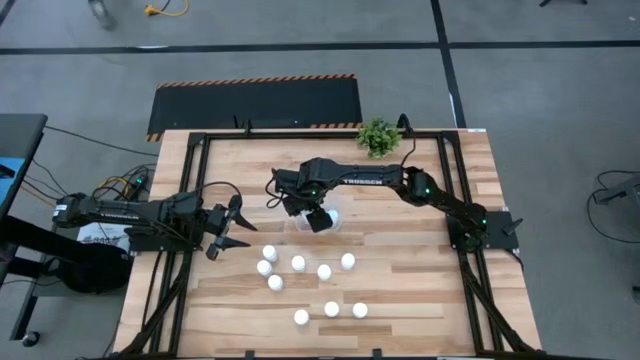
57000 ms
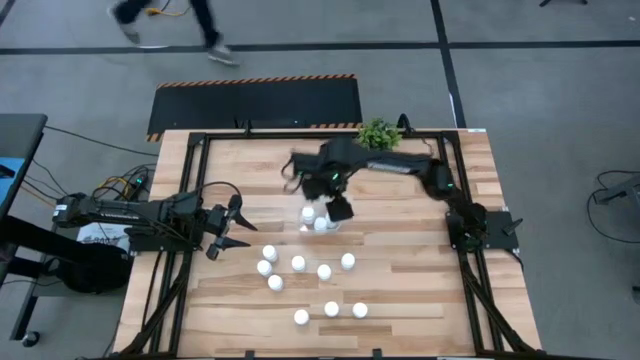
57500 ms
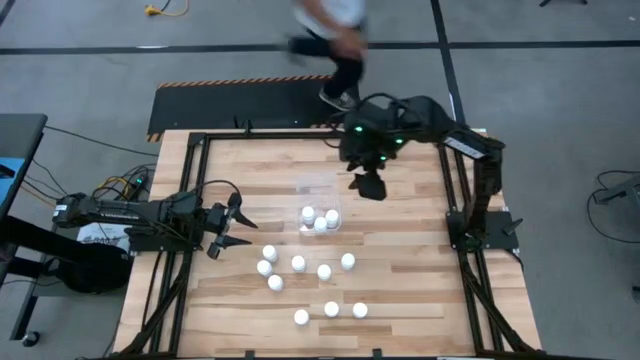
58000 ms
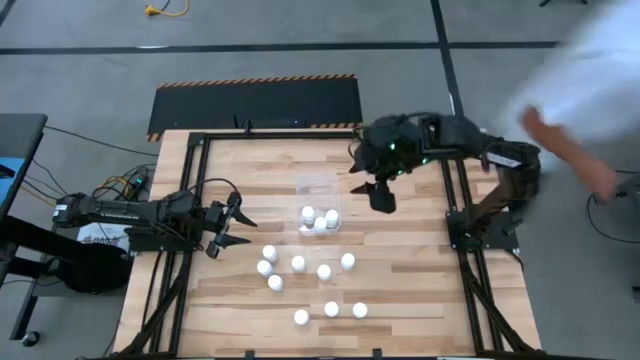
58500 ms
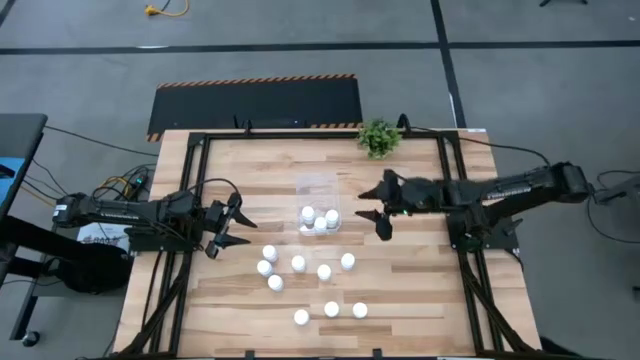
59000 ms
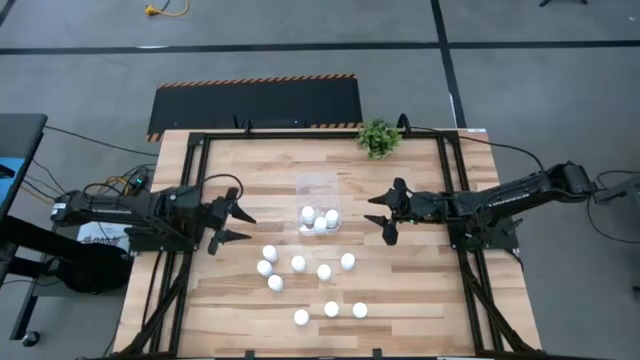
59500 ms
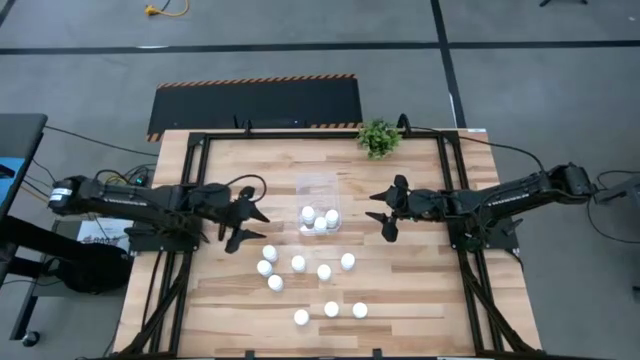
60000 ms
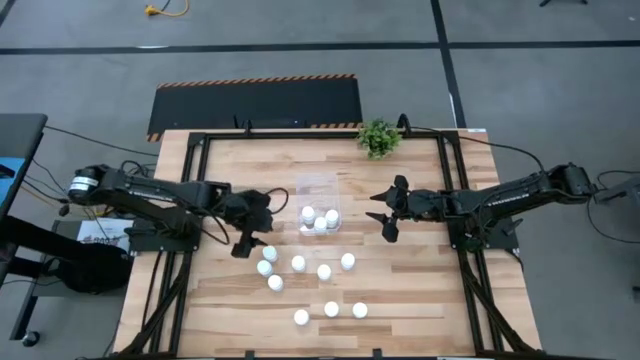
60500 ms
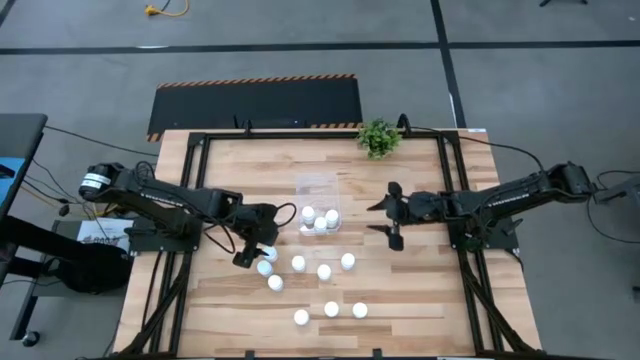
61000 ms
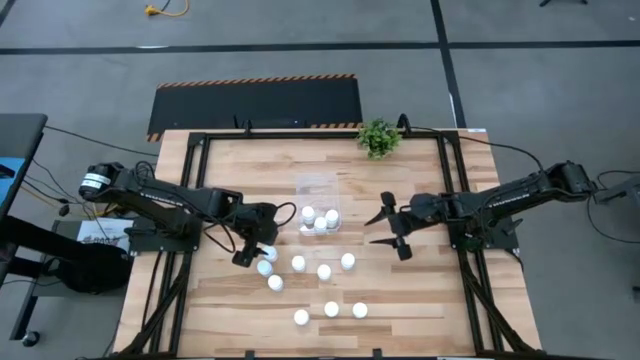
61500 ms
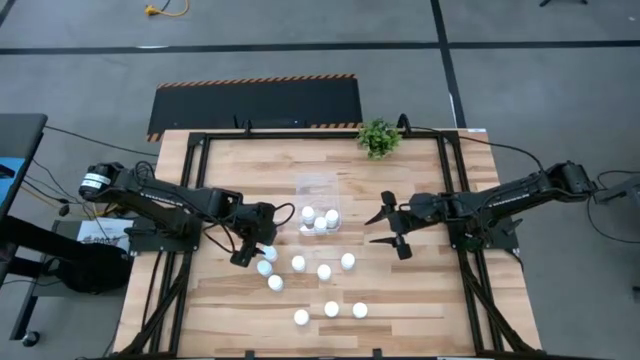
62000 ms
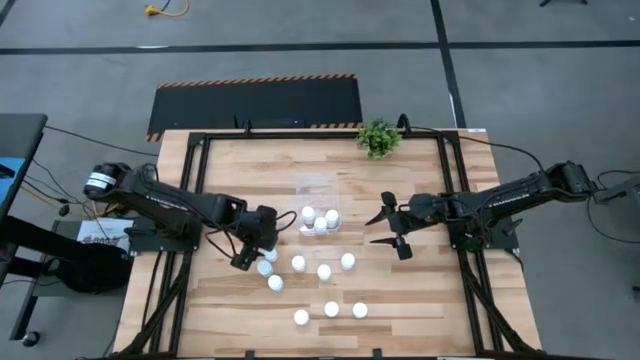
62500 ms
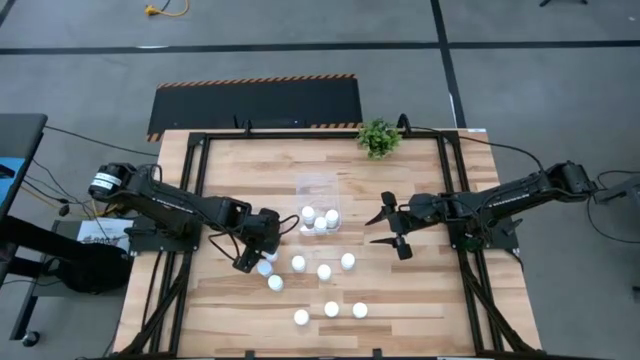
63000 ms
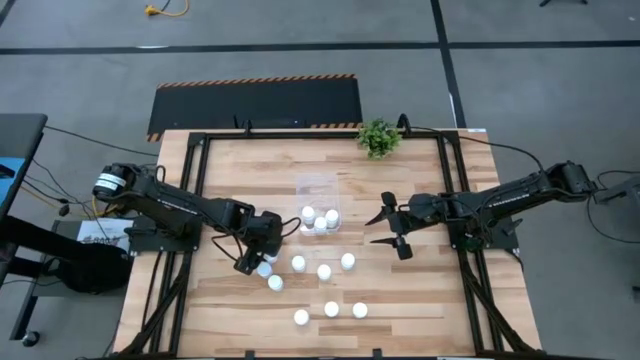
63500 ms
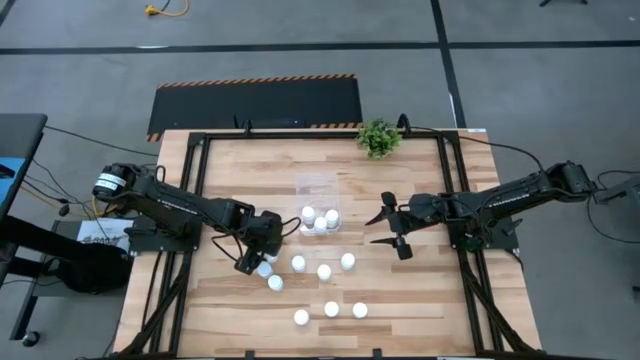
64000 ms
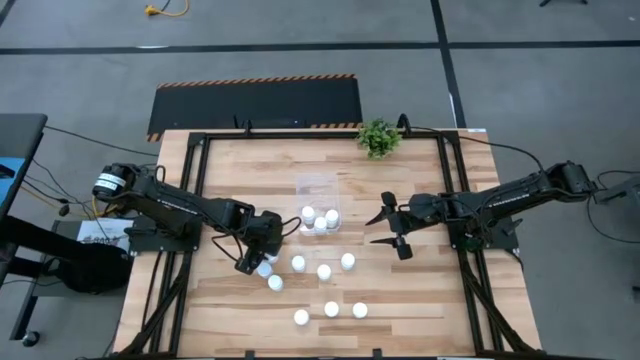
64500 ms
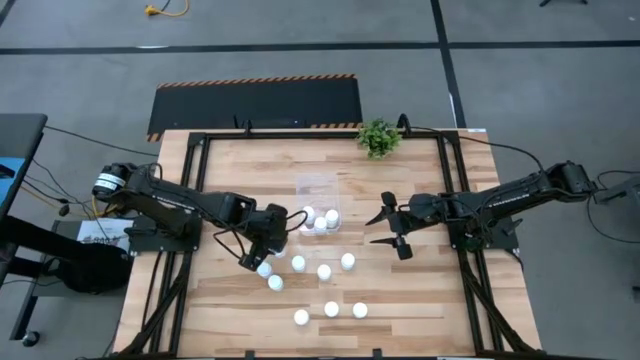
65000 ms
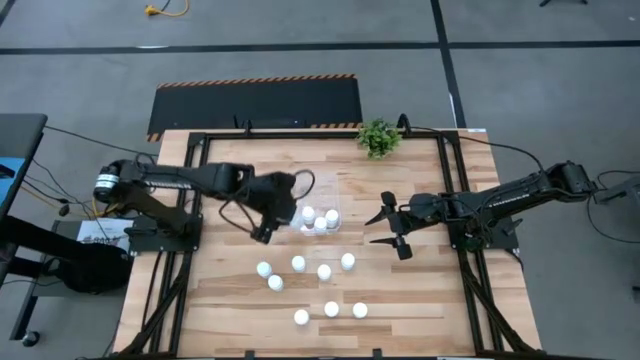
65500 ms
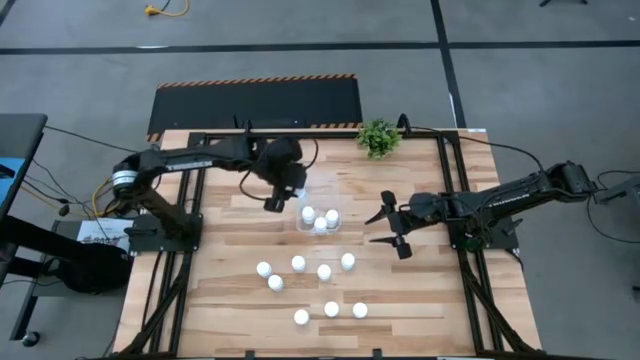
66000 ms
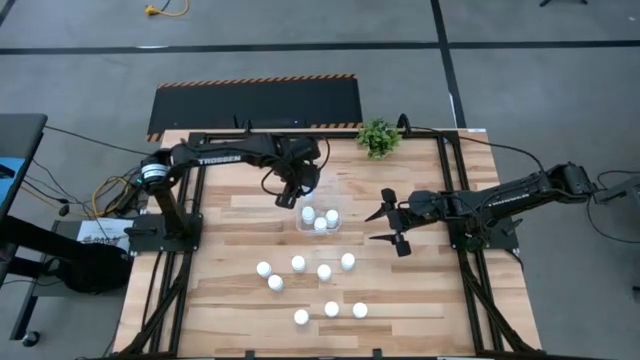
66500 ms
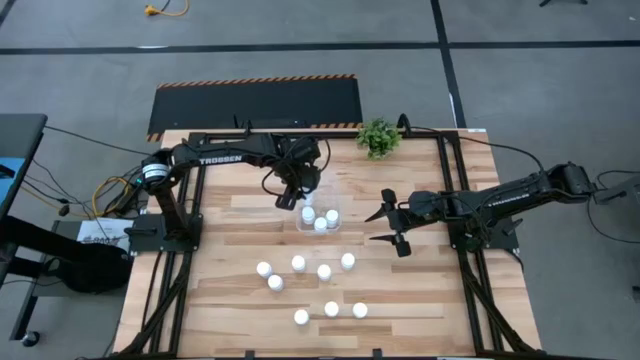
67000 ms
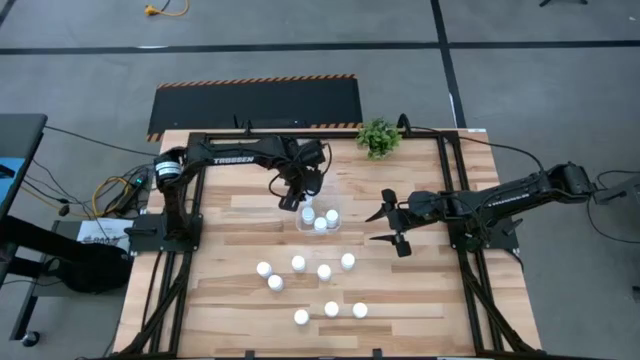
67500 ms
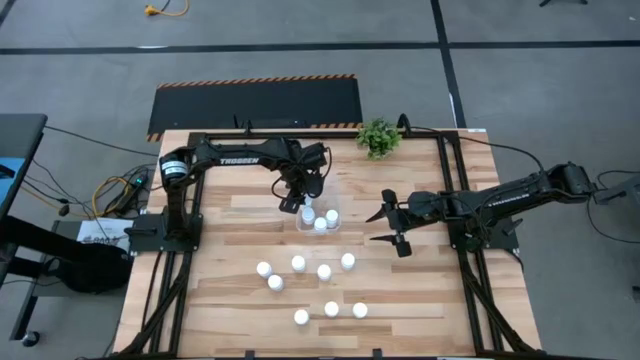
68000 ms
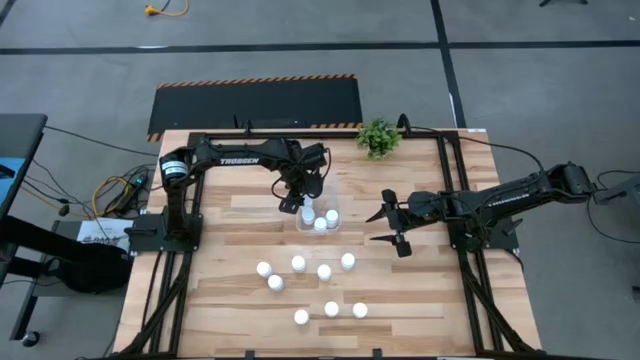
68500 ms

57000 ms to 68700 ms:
Task: Pick and place pill bottles into a basket
Put the pill bottles into the container

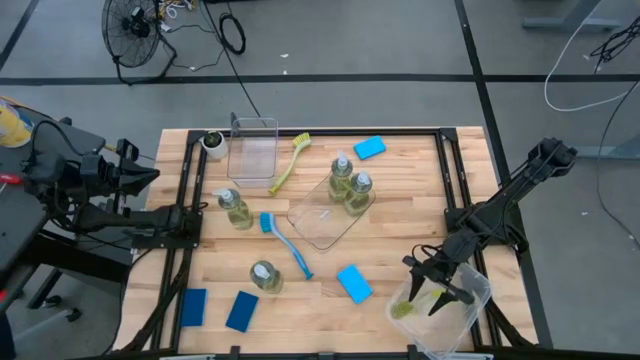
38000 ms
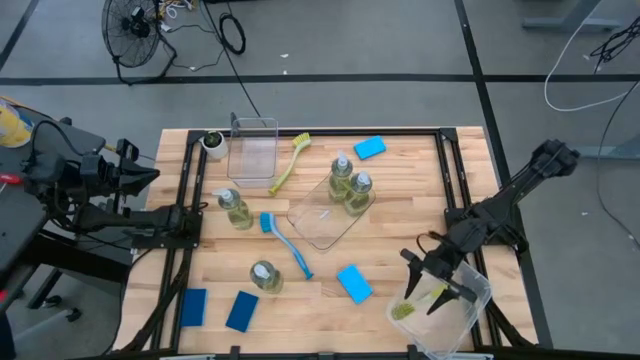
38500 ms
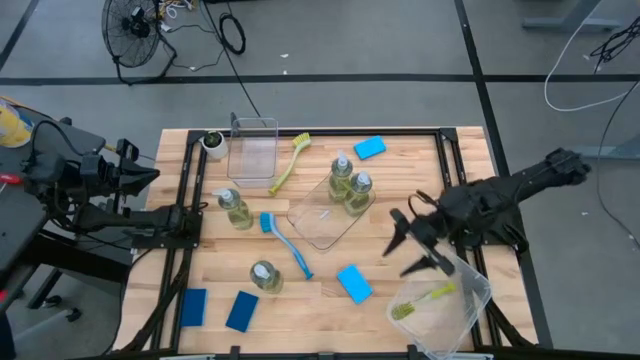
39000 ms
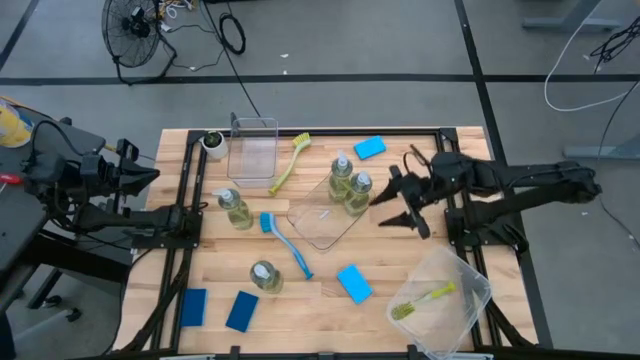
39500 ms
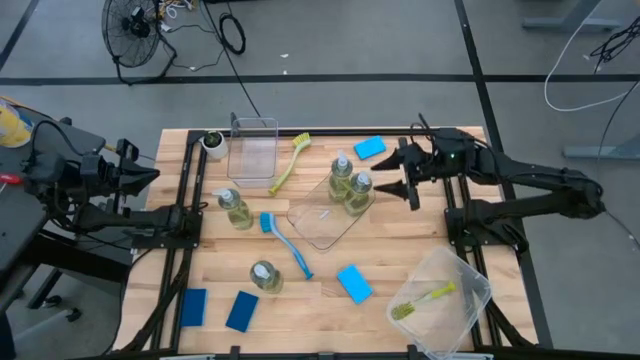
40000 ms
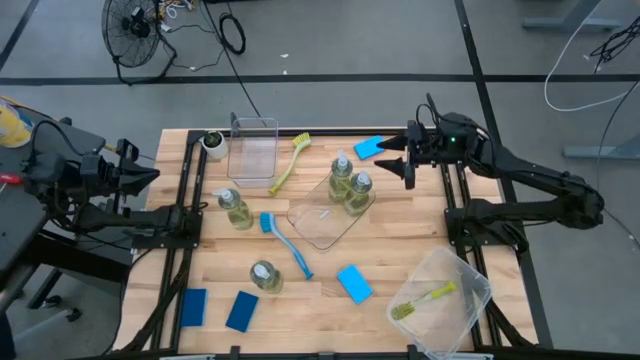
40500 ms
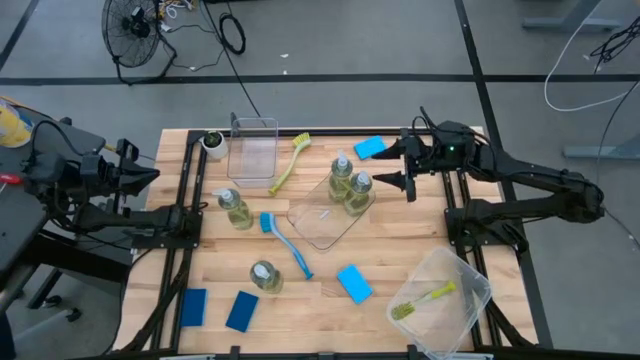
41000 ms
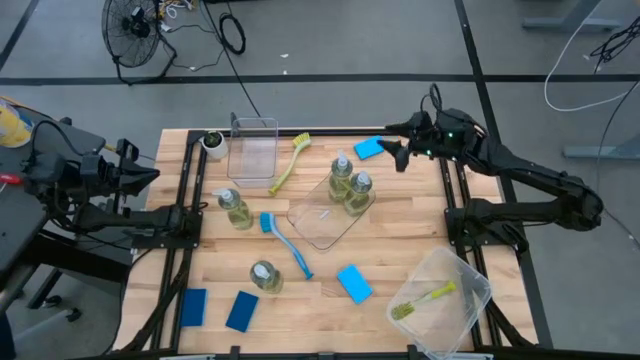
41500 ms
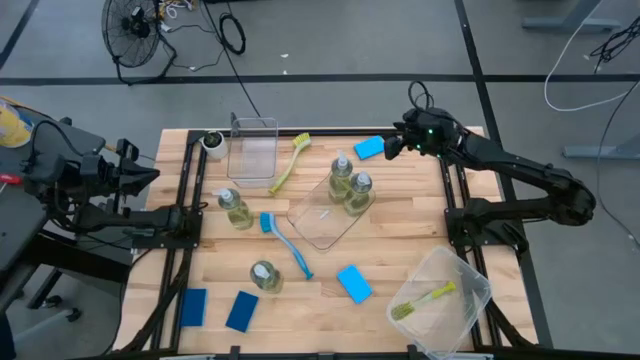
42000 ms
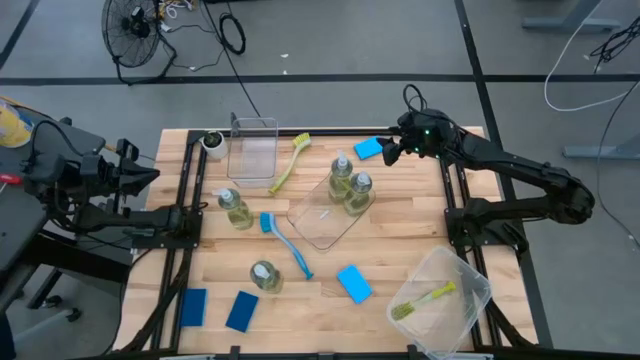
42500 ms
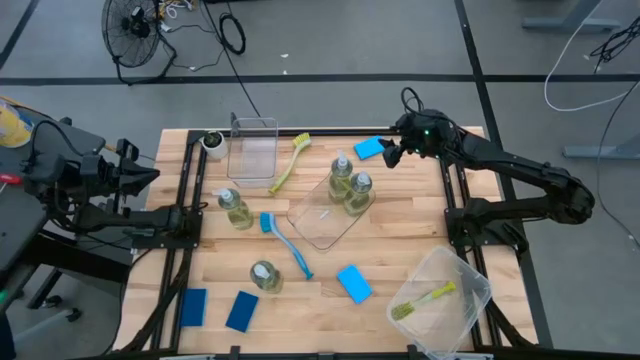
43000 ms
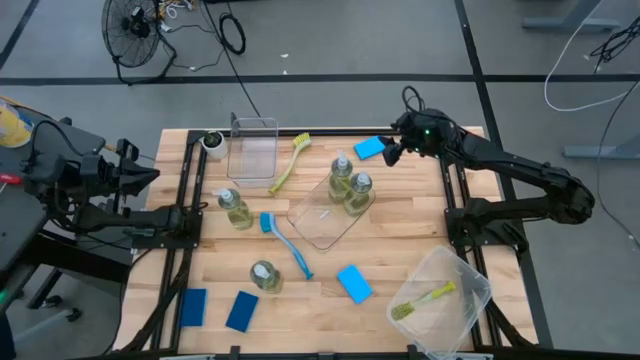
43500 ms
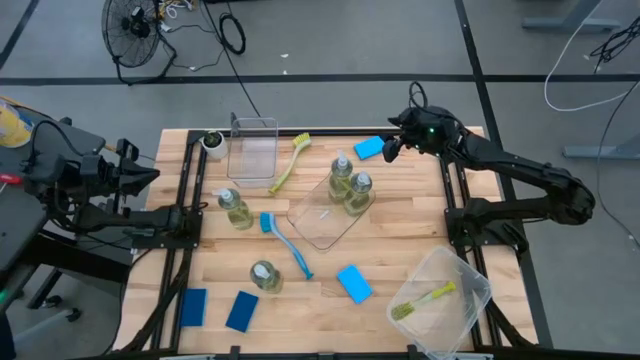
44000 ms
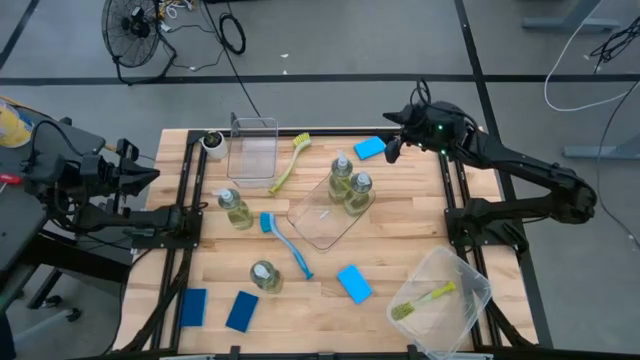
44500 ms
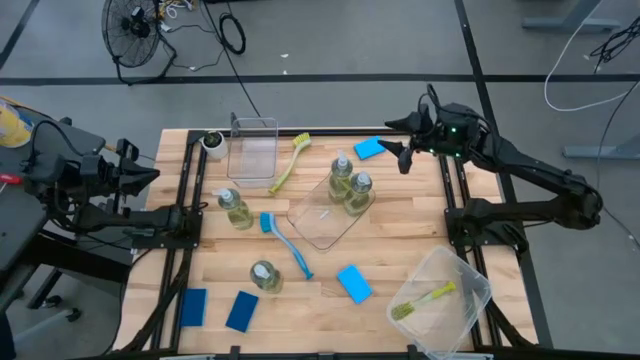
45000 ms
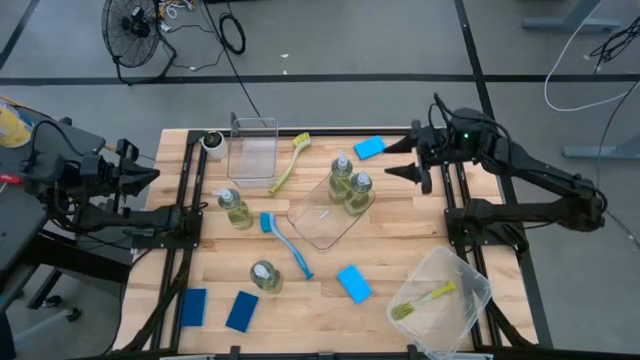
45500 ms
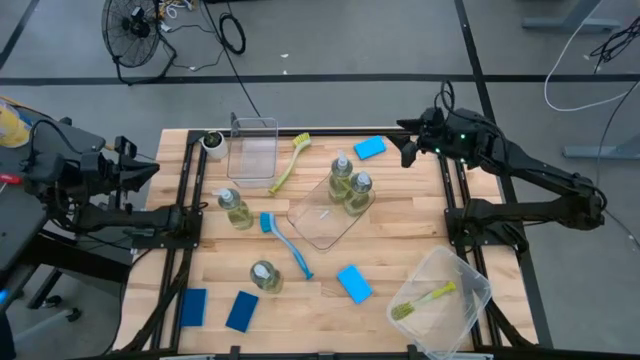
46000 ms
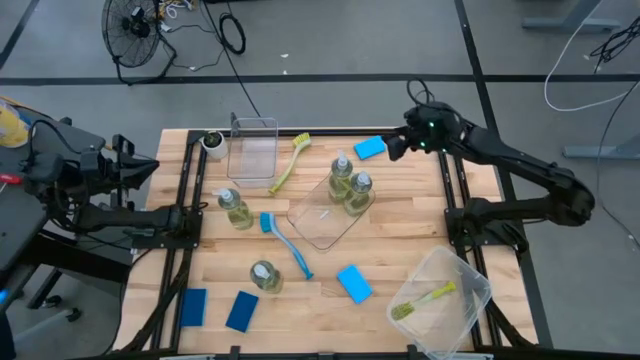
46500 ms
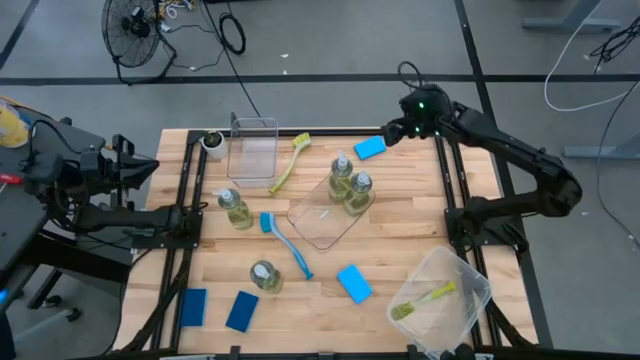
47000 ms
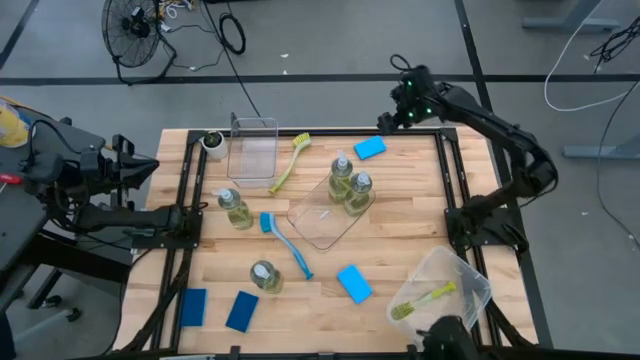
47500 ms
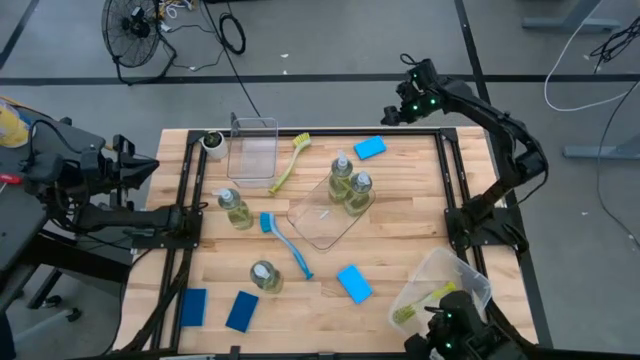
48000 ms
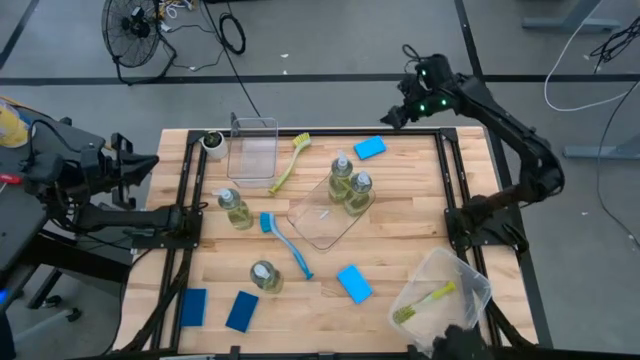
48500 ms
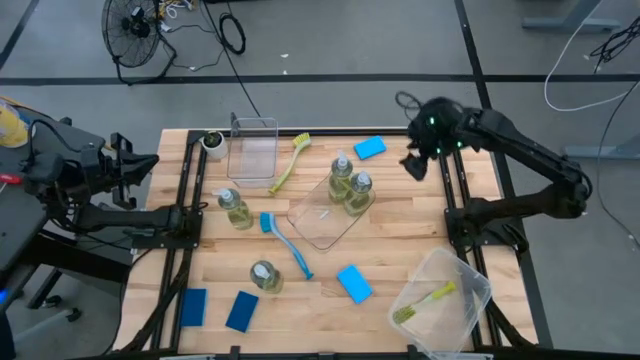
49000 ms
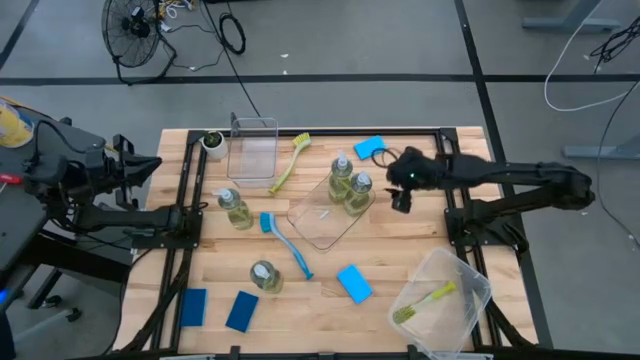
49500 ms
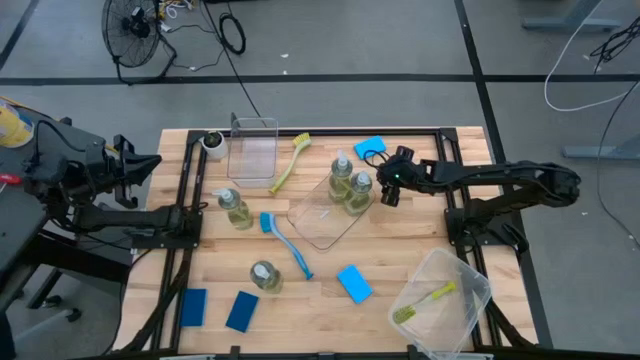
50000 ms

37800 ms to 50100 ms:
Task: Pick & Place Kitchen Sink Supplies
Put the blue sponge into the top transparent bin
